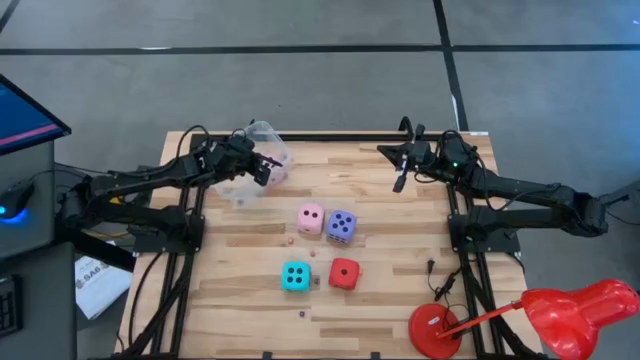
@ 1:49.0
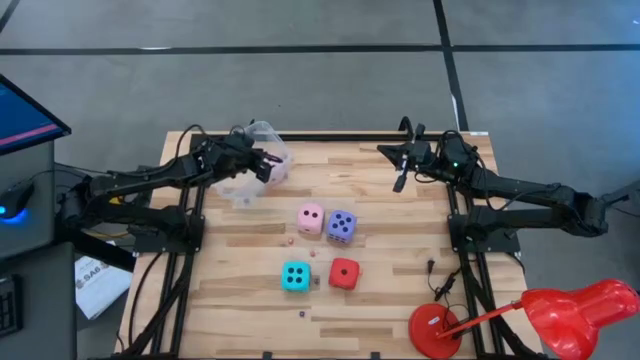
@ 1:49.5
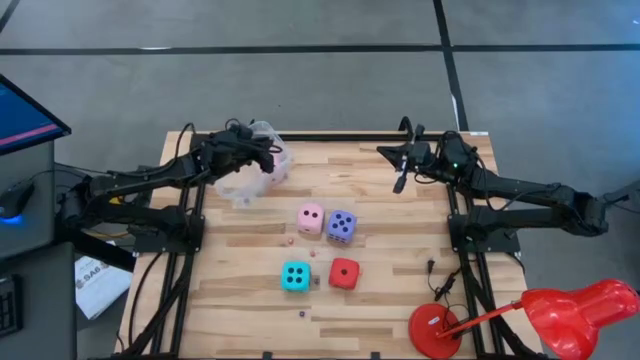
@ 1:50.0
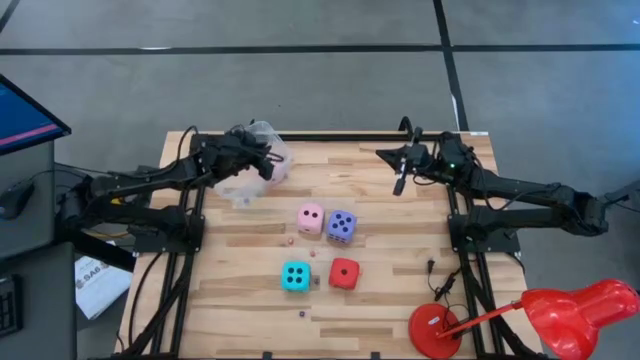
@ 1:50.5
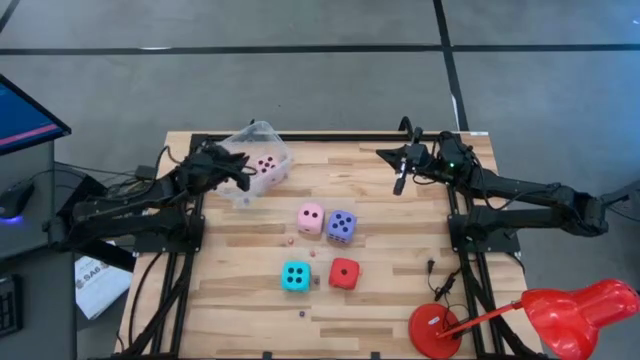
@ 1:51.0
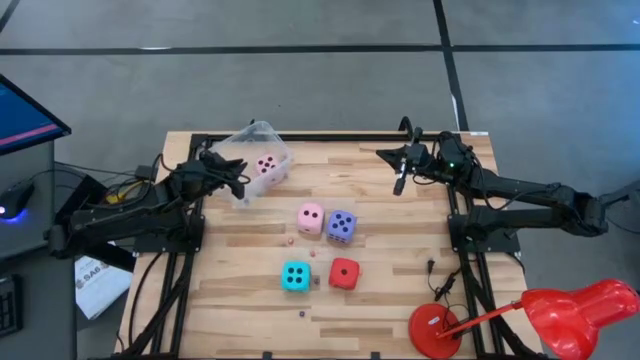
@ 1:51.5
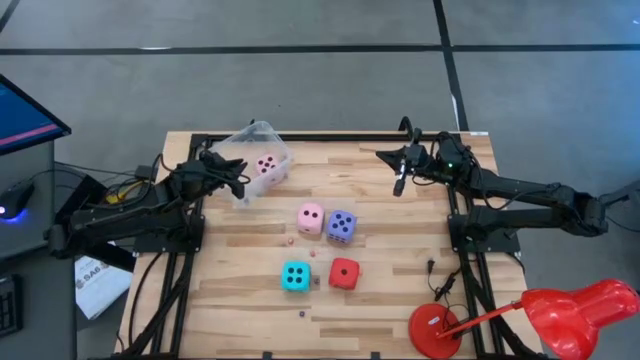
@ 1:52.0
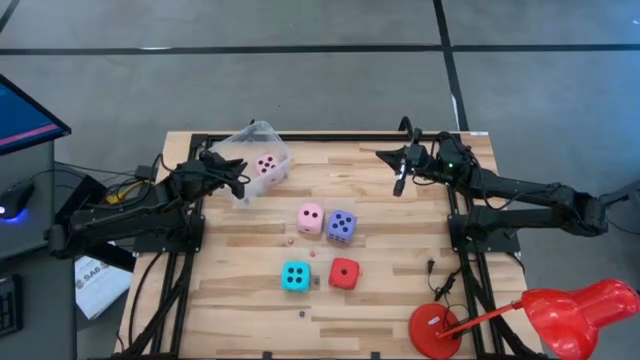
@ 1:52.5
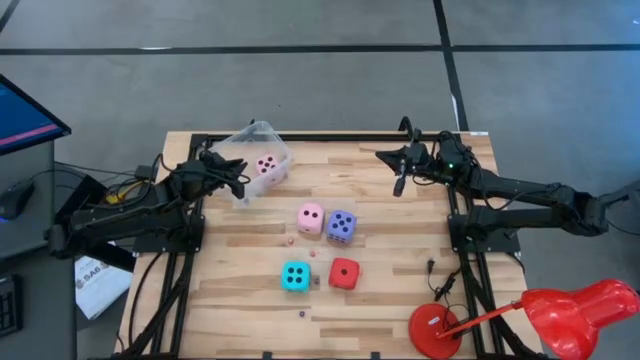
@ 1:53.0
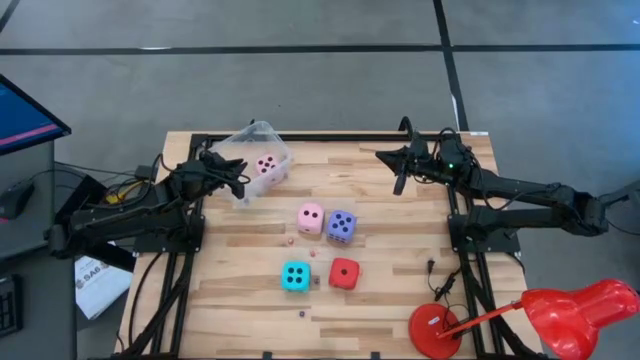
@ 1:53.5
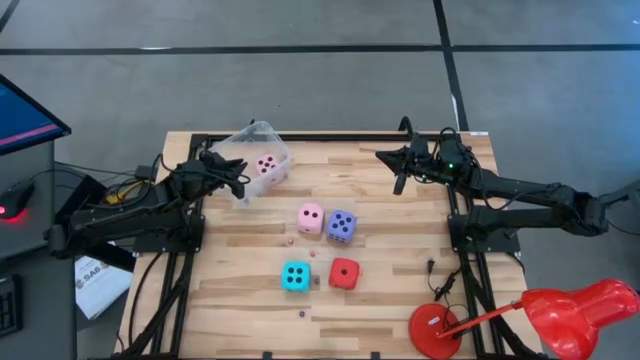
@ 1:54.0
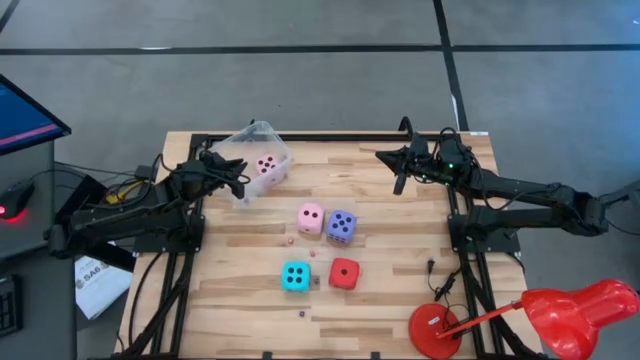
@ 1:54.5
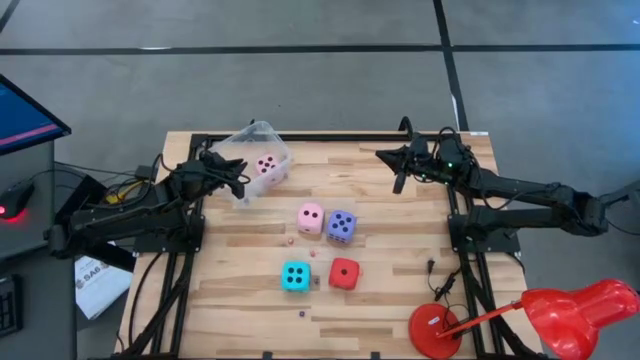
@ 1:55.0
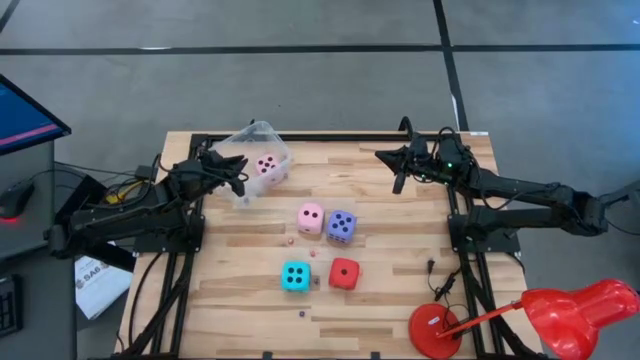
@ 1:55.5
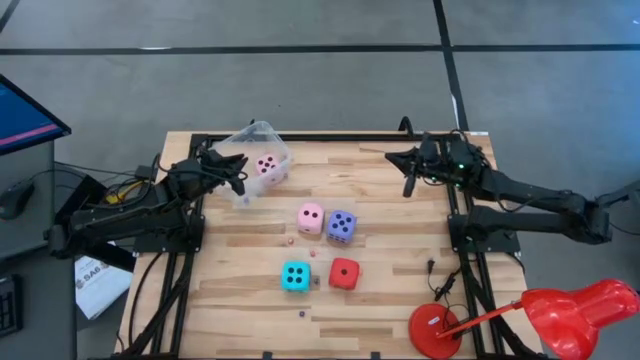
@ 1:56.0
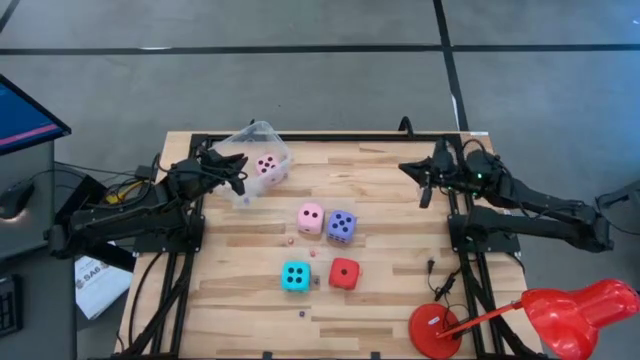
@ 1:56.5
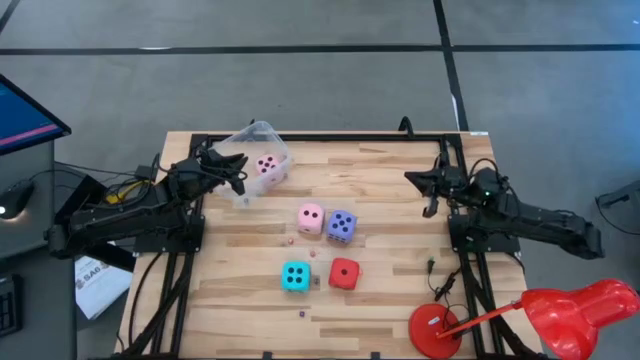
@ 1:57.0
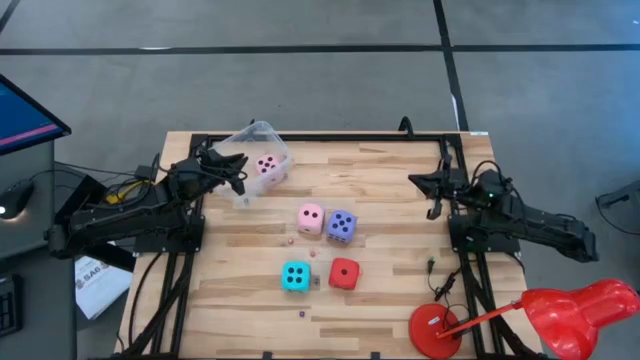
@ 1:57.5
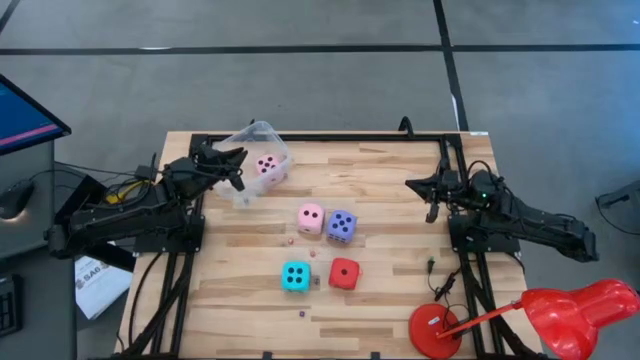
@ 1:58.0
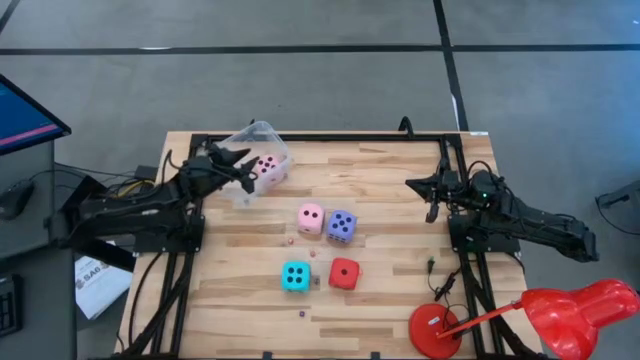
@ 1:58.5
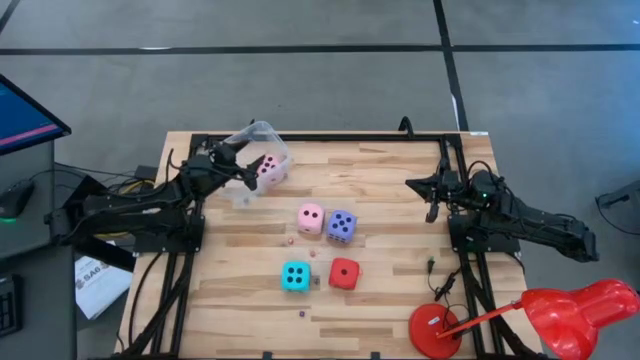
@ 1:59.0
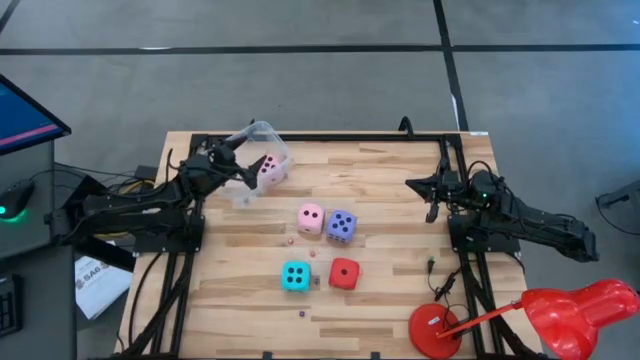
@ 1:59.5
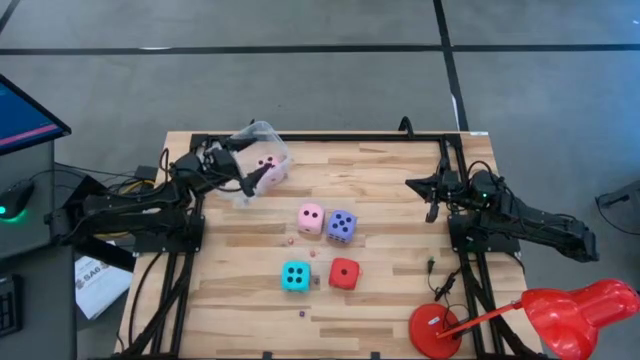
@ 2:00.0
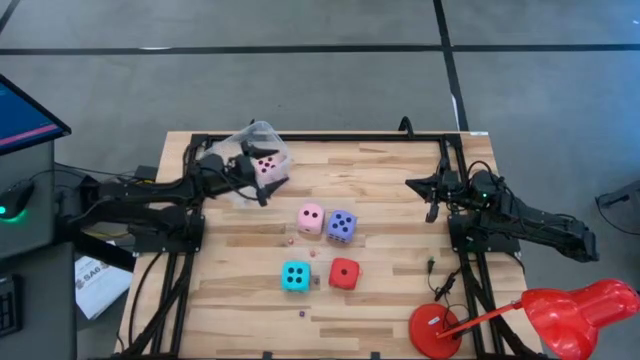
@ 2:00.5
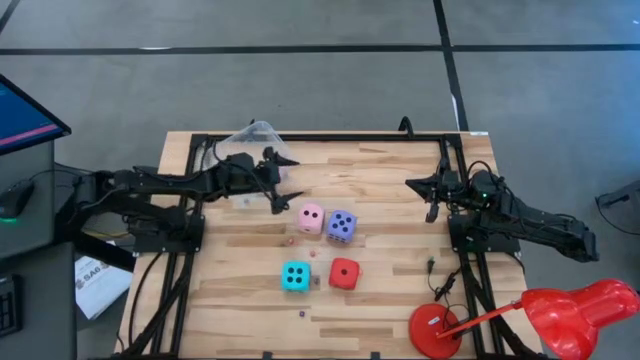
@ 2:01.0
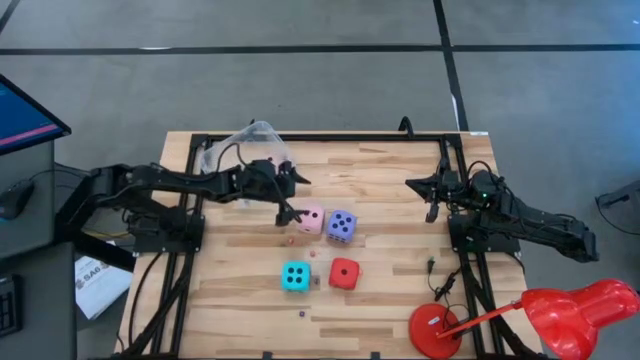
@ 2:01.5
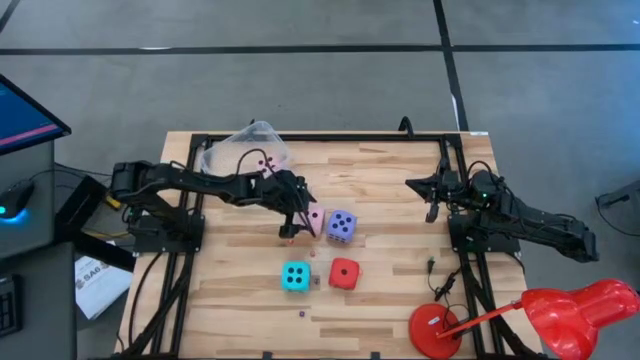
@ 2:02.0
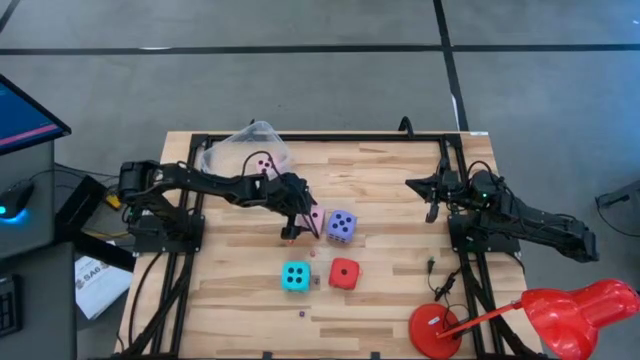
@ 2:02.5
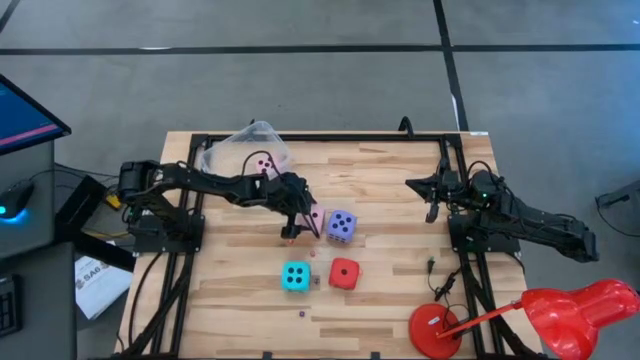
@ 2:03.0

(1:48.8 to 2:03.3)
Task: Pick & Place Dice
Put the large pink dice into the transparent container

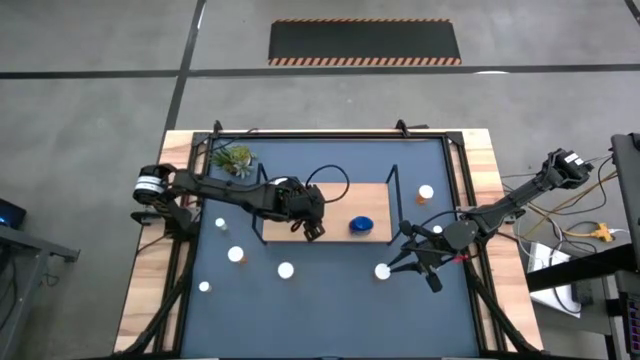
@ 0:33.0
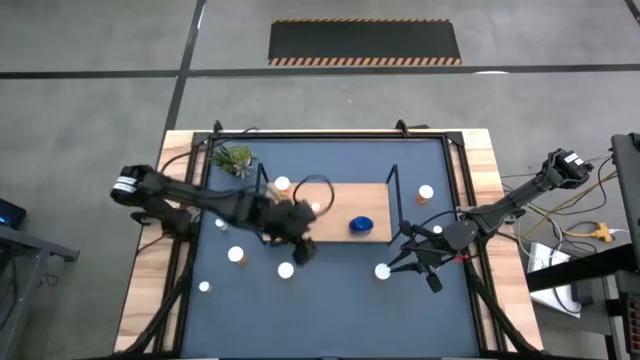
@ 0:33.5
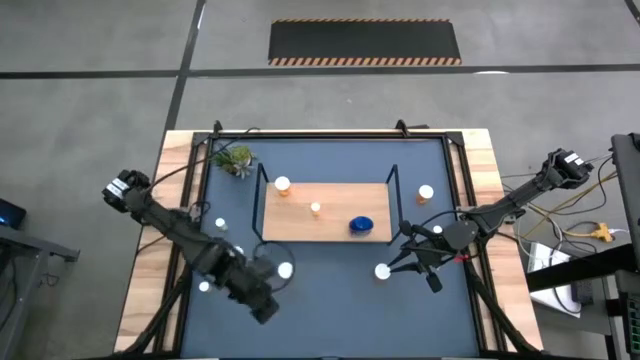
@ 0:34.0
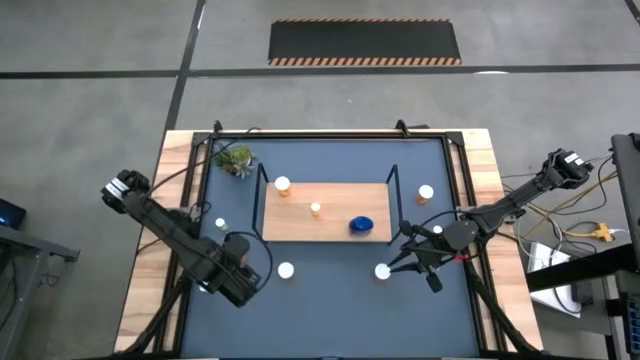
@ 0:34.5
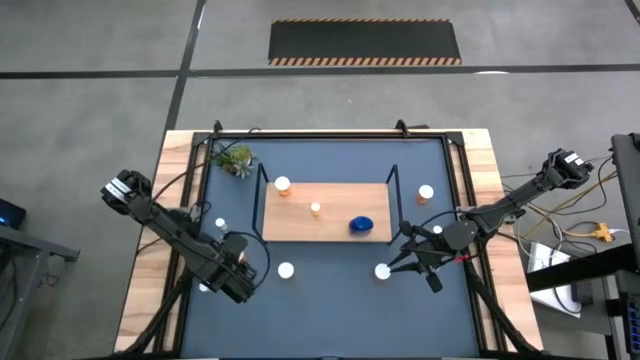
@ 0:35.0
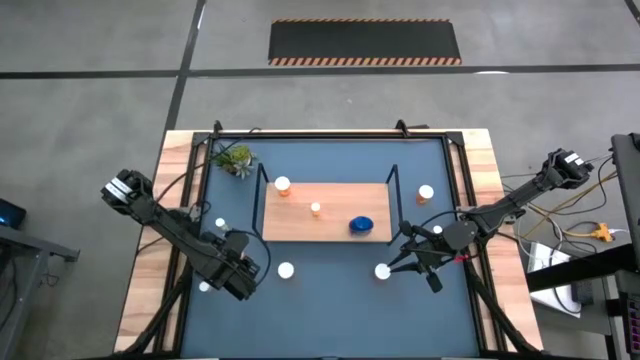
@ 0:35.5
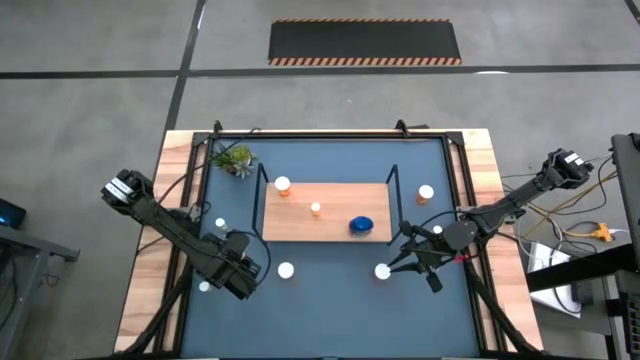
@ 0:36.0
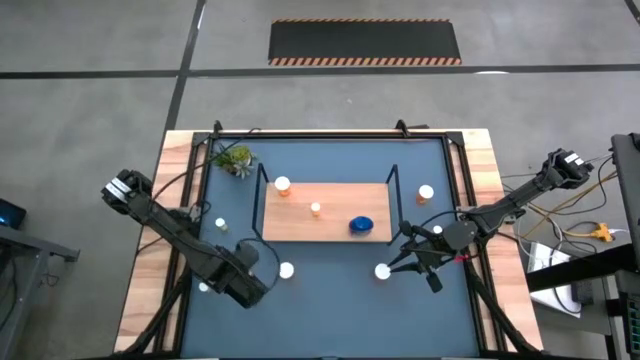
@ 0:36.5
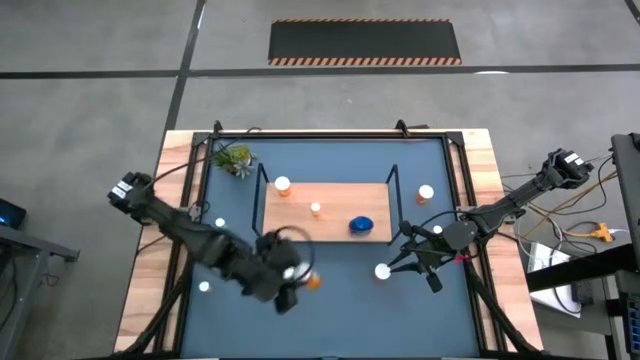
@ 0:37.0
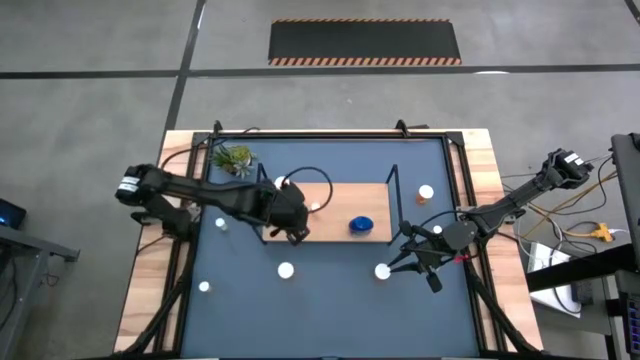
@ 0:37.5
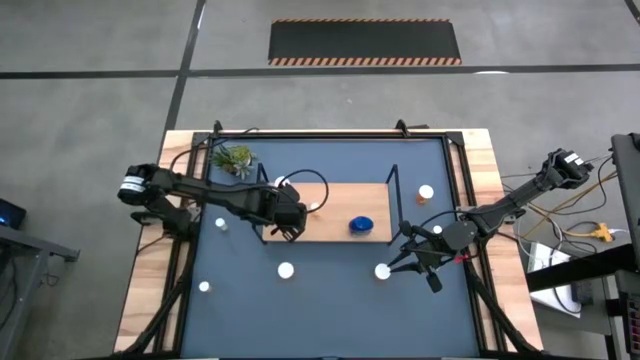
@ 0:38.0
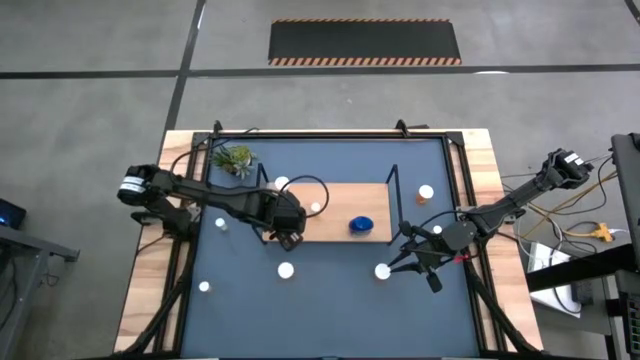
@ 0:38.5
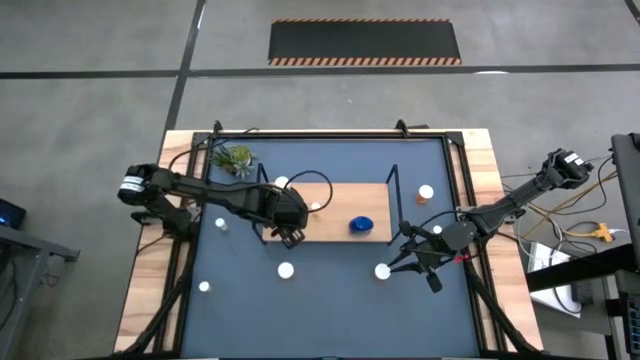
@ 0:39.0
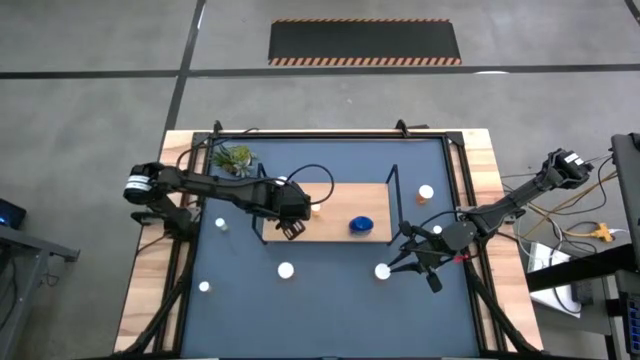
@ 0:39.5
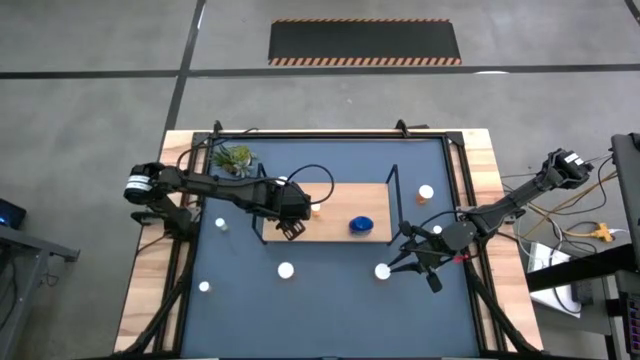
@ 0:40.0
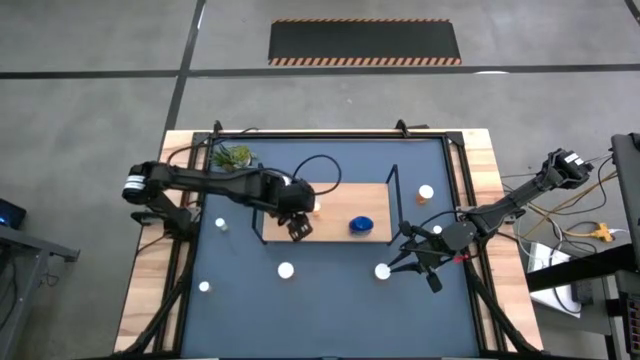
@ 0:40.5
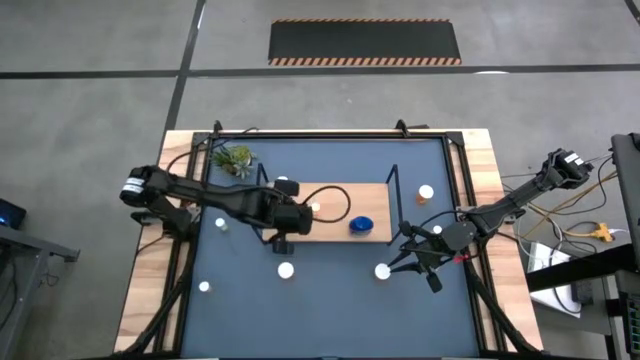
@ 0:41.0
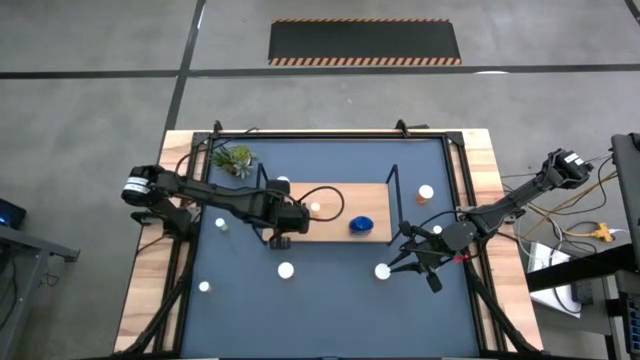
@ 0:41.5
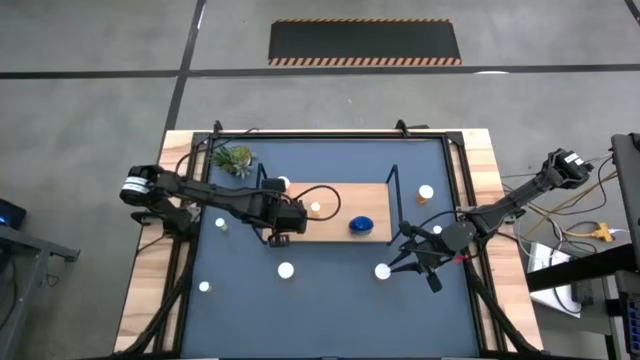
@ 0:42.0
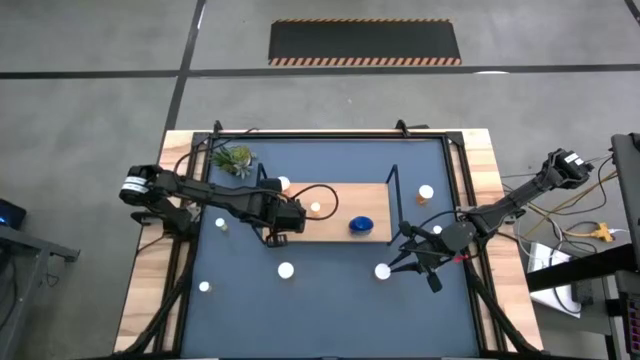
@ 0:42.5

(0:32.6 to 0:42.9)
Task: Pick and place medicine bottles onto shelf by color
Put the big orange pill bottle on to the shelf aligned with the other big orange pill bottle
